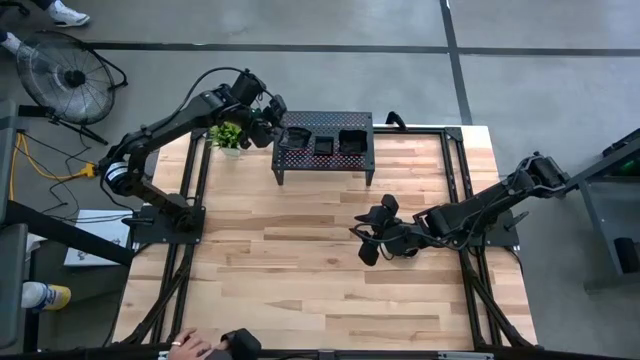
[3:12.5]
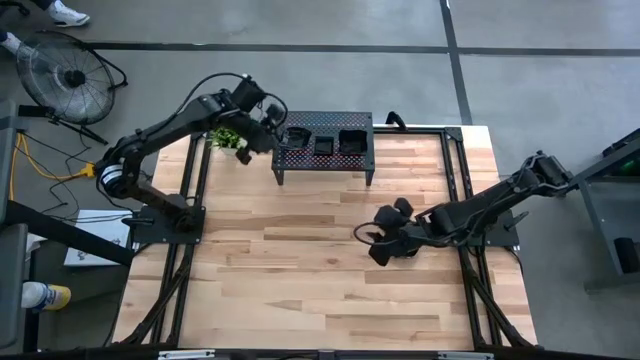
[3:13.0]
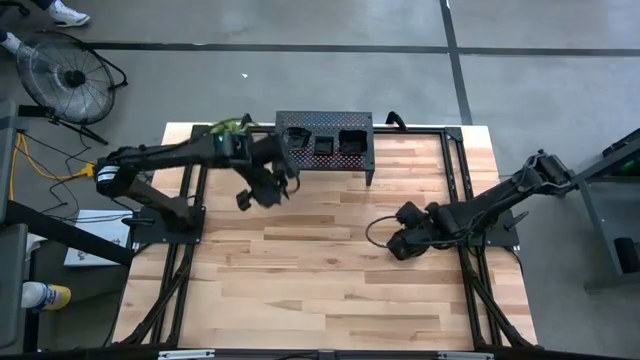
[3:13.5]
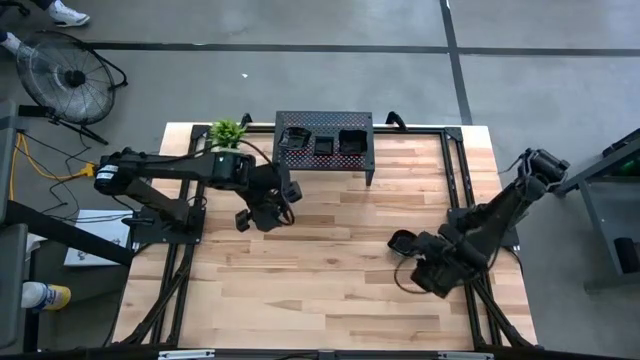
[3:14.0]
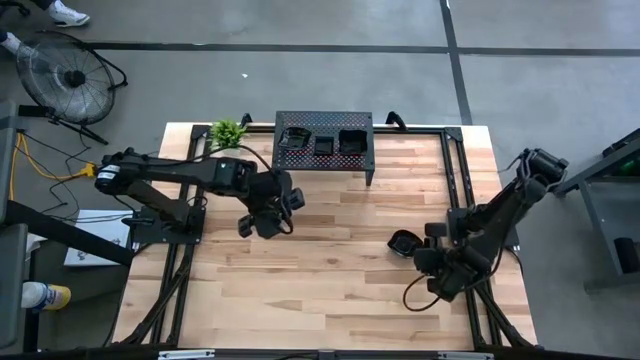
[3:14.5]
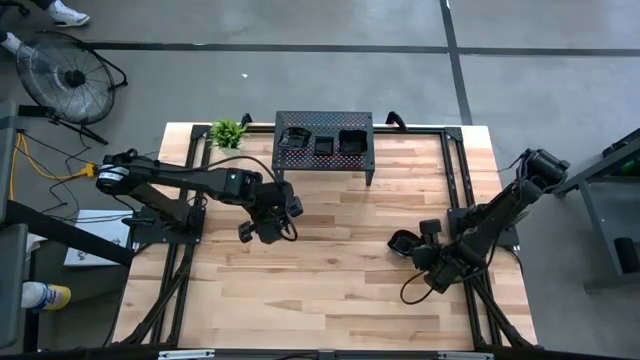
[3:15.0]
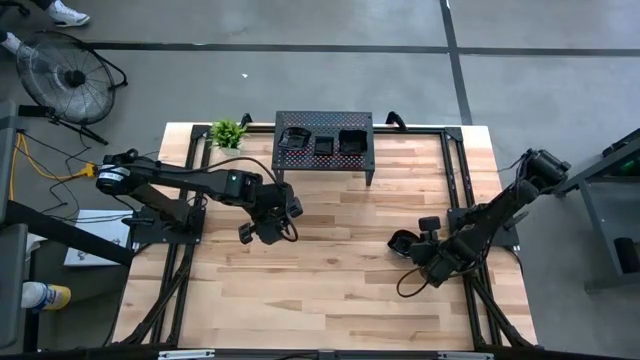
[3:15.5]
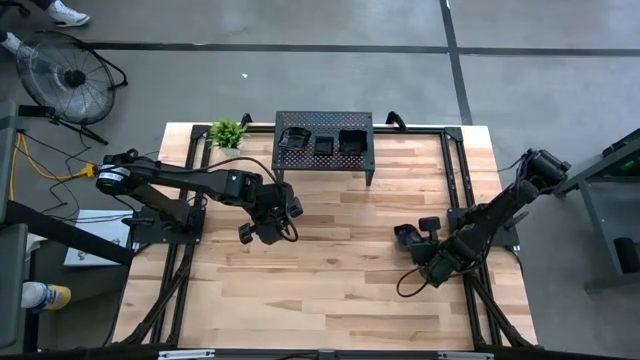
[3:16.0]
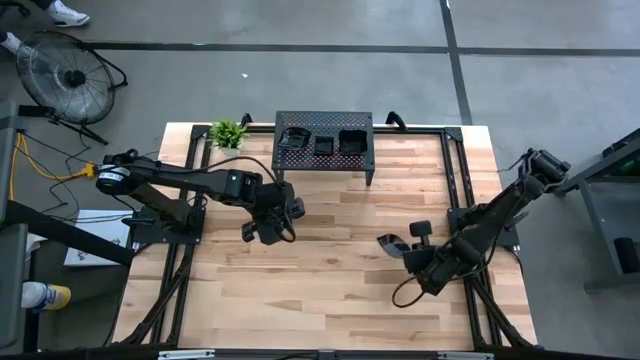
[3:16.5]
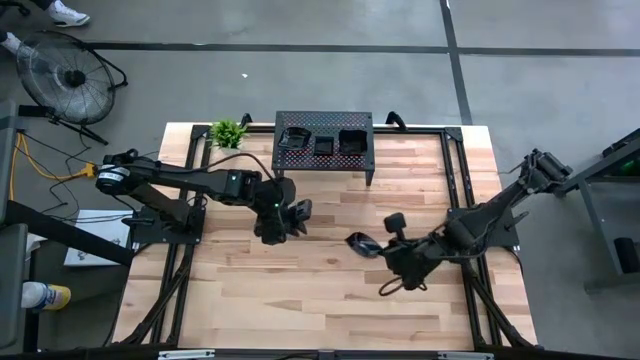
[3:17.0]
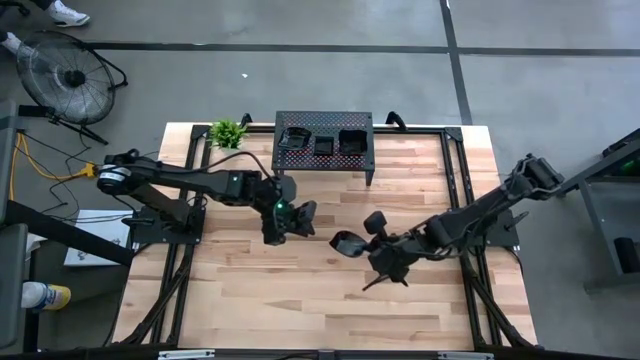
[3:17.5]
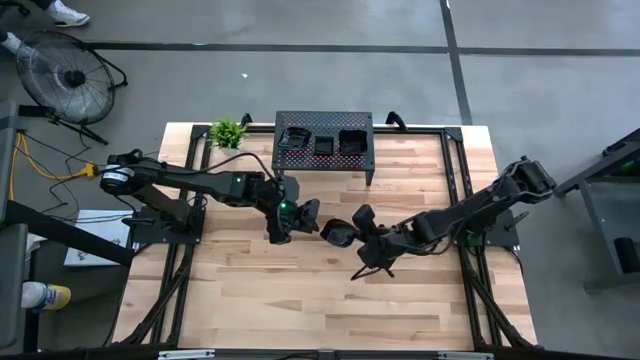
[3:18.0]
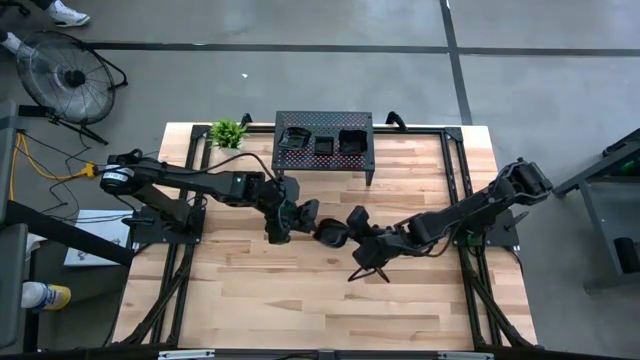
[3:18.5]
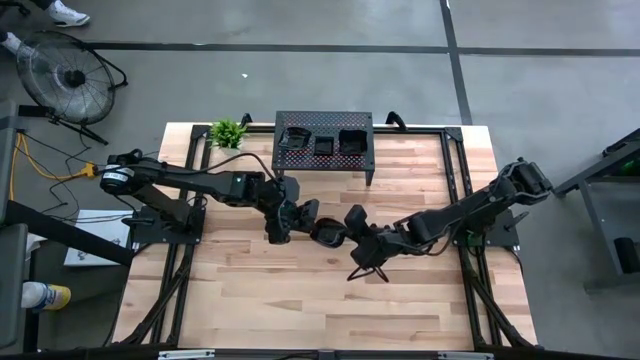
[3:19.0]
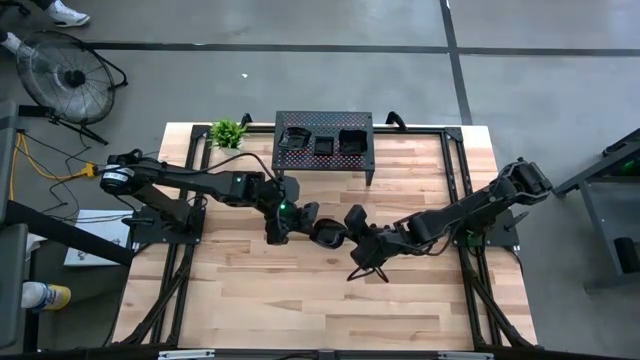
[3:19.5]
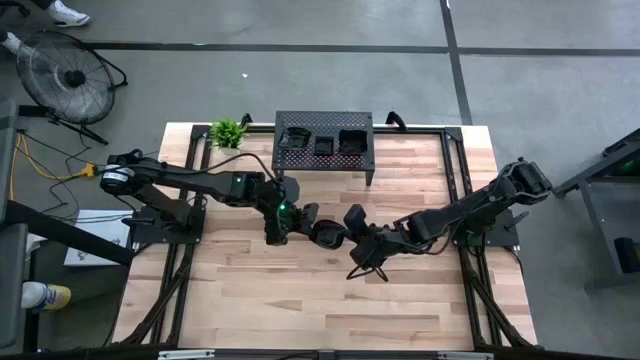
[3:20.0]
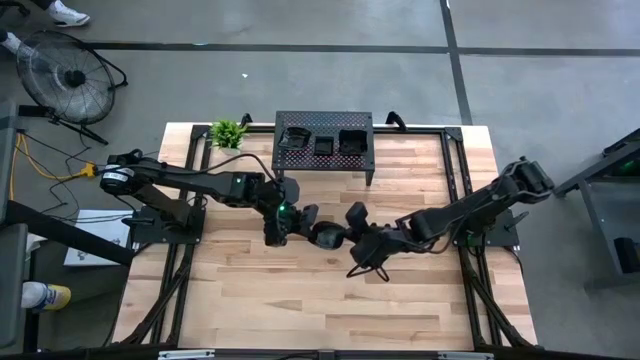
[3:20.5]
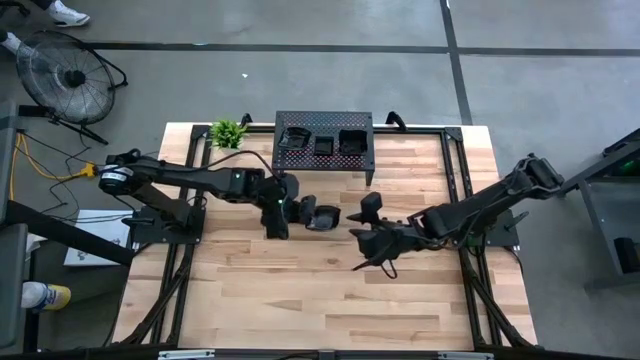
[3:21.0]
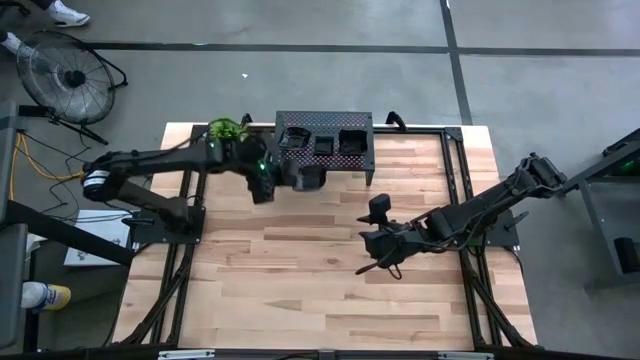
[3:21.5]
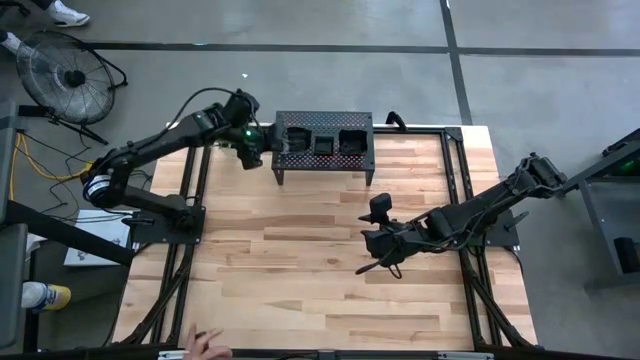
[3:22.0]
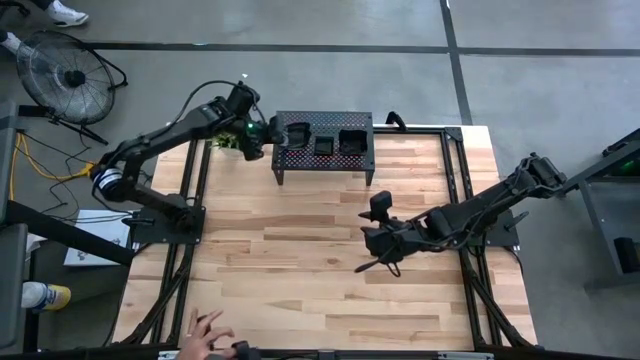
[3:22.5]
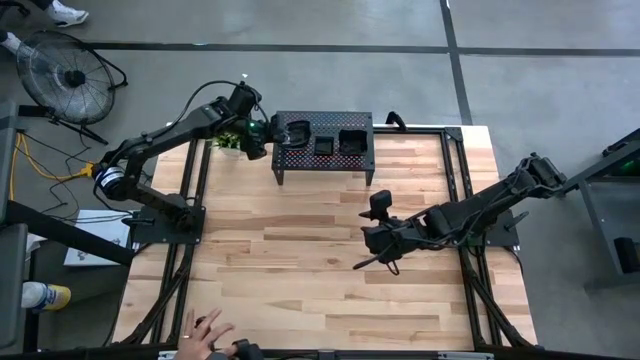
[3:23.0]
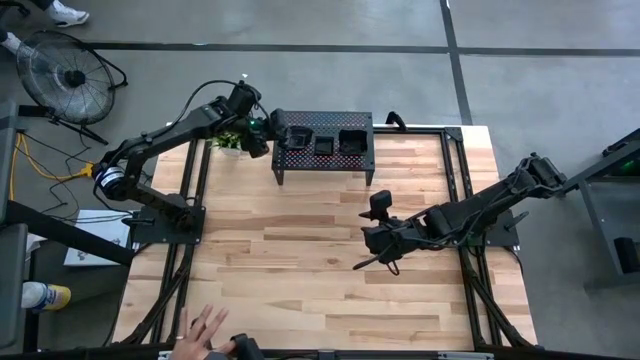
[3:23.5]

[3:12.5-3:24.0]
Task: Pick & Place Mini shaped plates
Stack the leaf-shaped plate on top of the leaf-shaped plate on the shelf

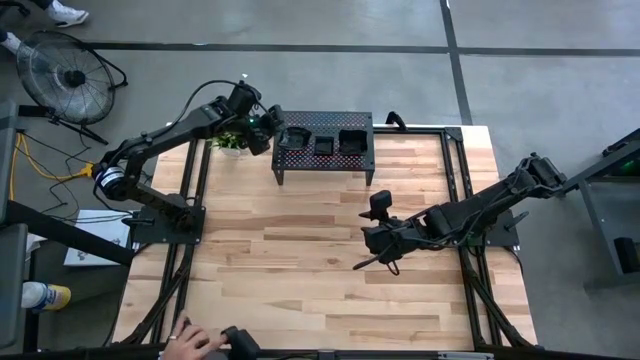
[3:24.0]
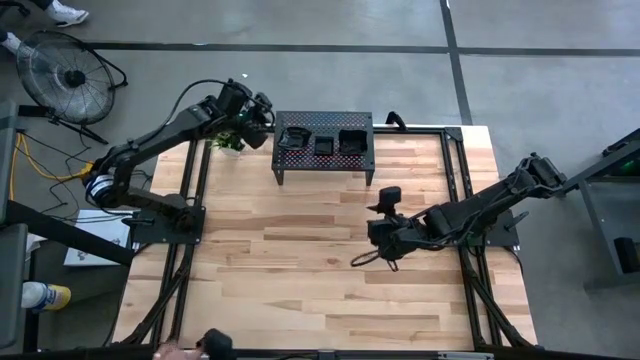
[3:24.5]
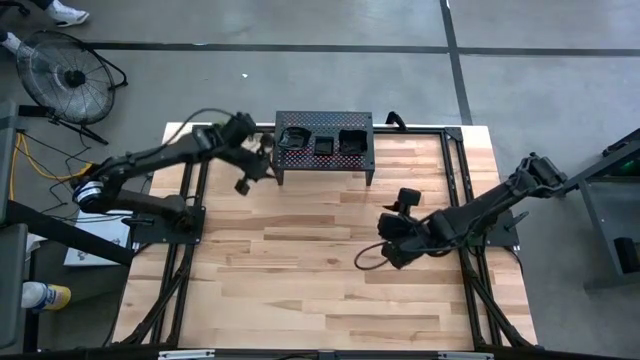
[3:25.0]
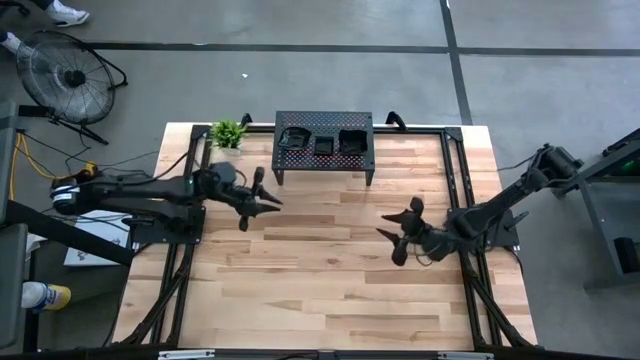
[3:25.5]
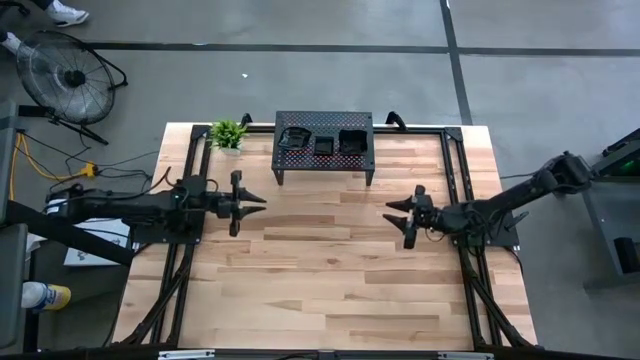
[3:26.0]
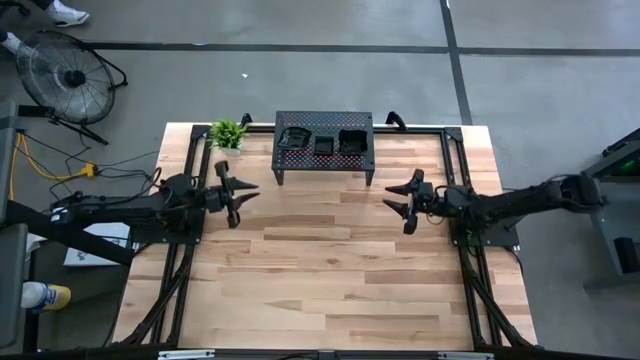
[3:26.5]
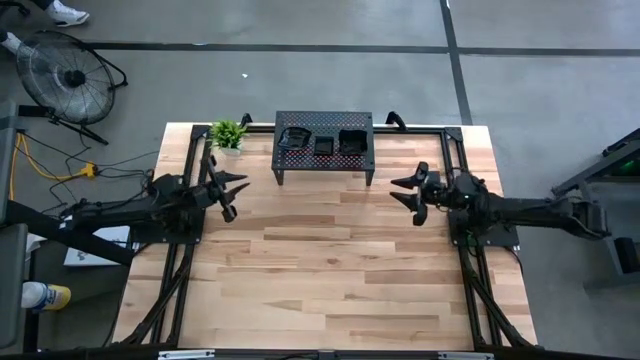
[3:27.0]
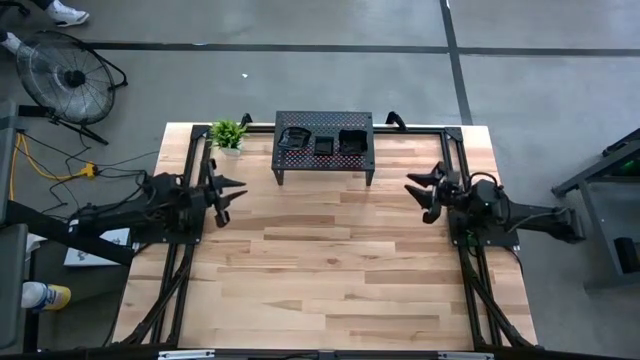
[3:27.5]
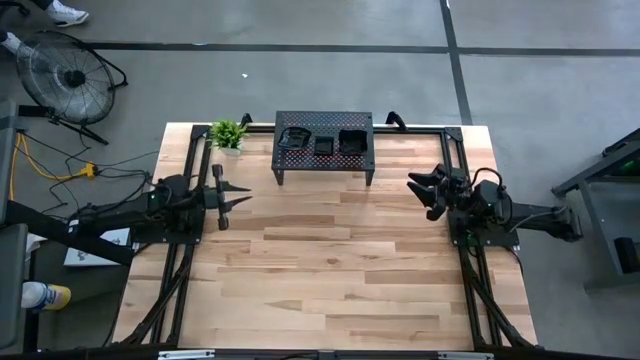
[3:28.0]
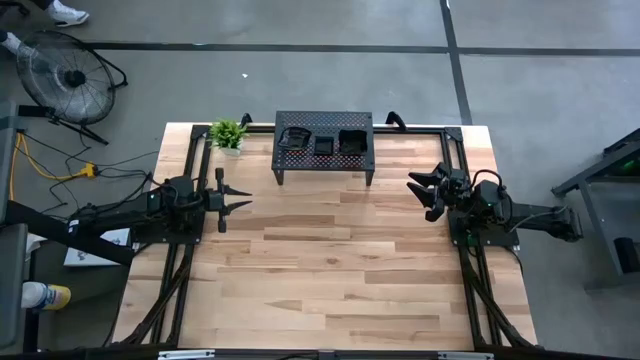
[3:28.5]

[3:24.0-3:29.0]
Return to Home Position

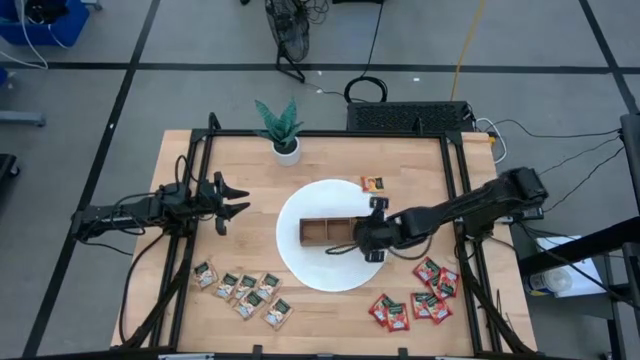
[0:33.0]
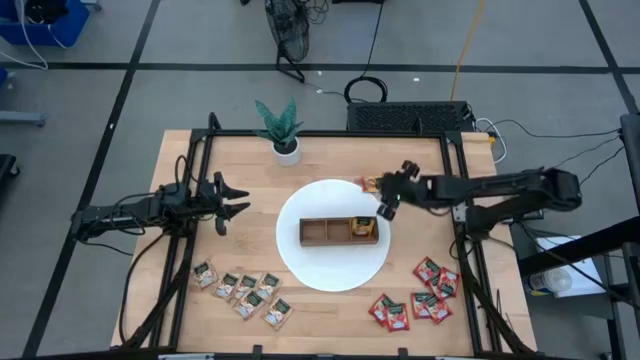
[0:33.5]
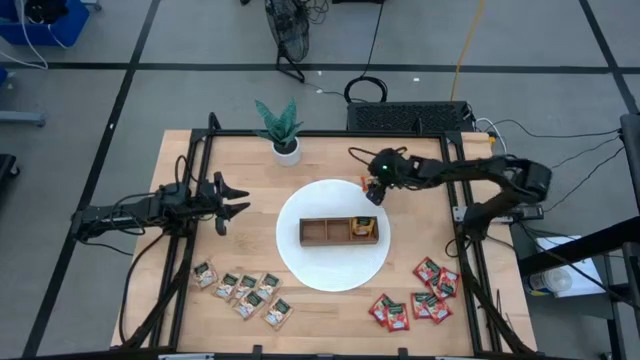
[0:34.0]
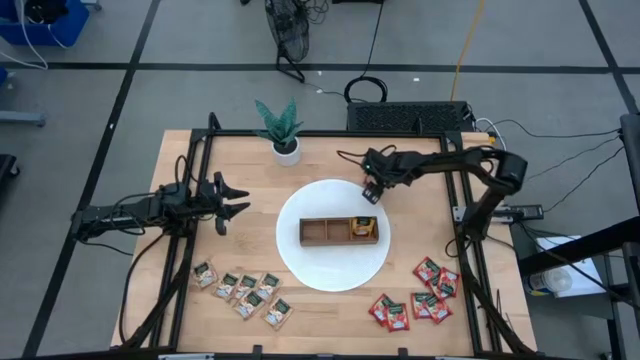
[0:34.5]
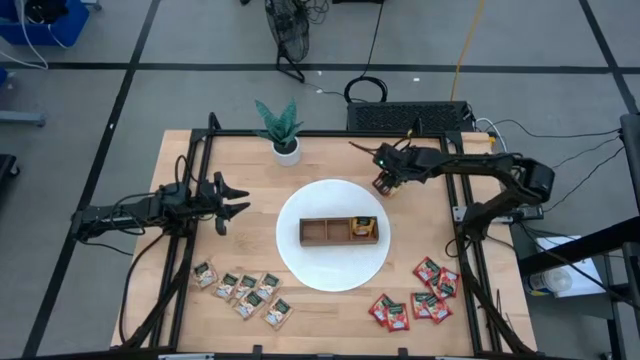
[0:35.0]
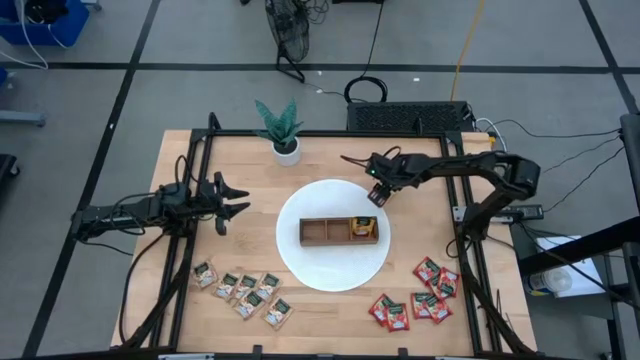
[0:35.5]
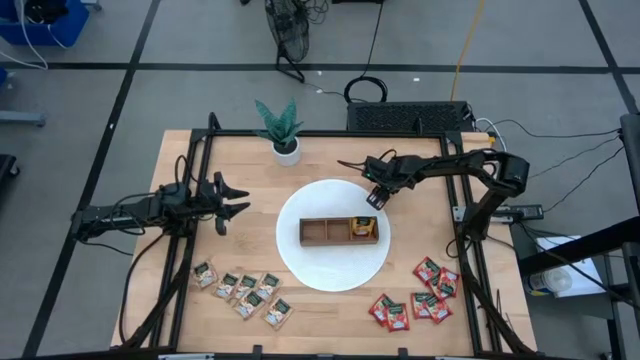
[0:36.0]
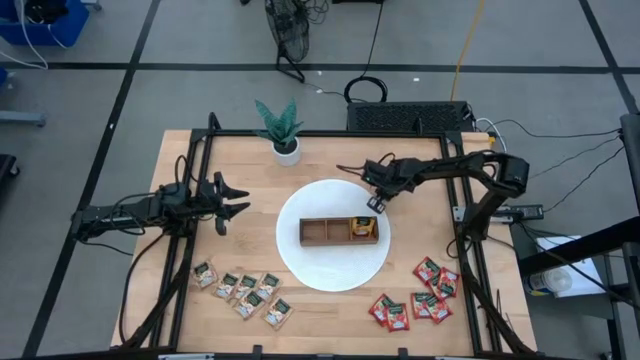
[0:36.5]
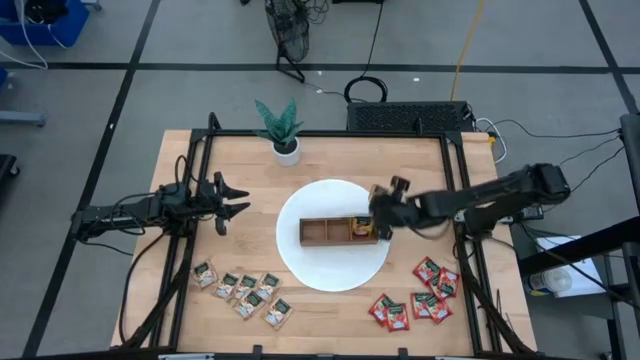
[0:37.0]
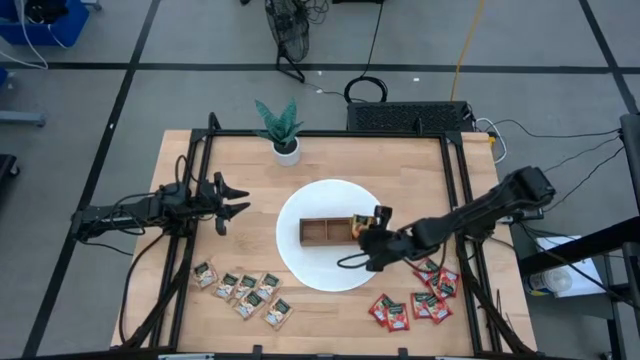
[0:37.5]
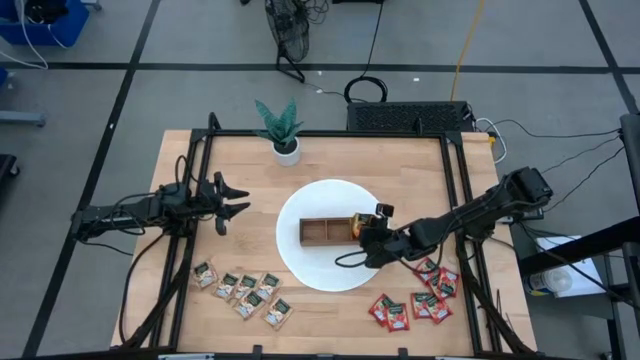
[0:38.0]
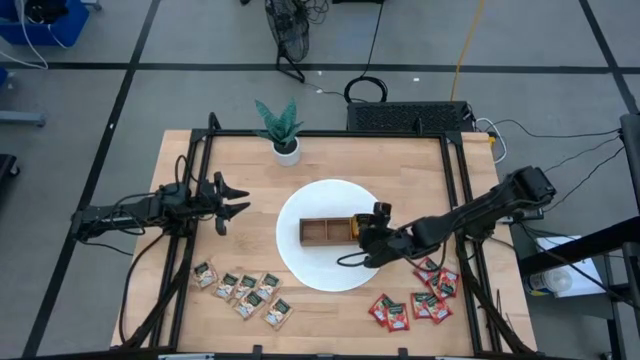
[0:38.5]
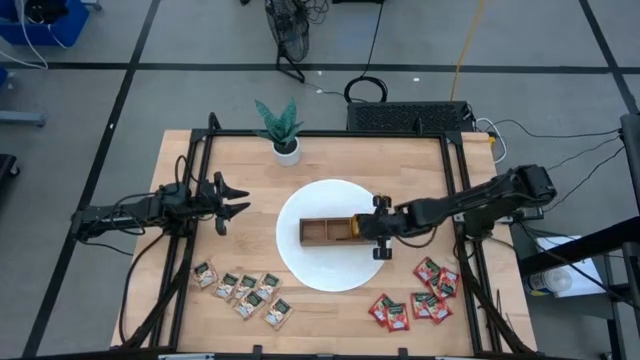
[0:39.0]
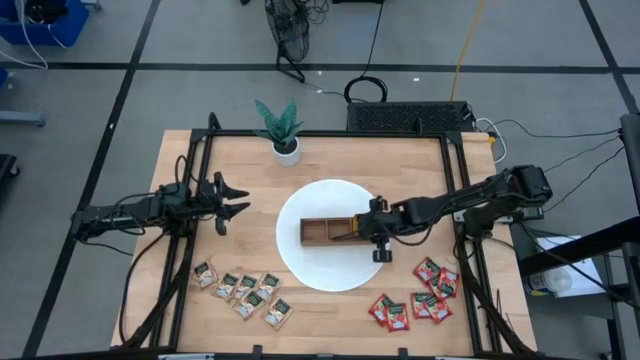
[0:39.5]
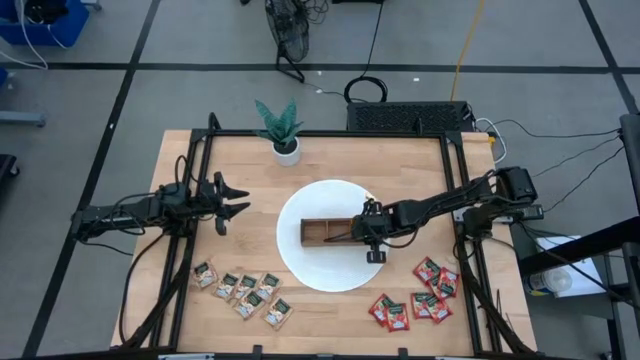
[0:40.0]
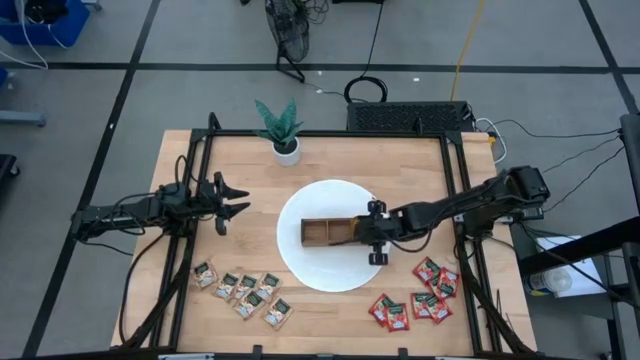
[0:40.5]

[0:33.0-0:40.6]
Task: Pick & Place Tea
Put the yellow tea bag into the right section of the wooden organizer
